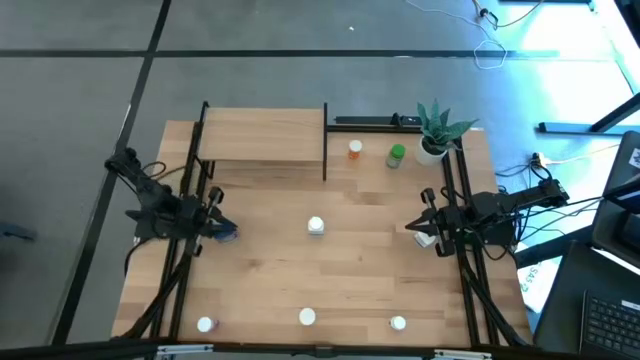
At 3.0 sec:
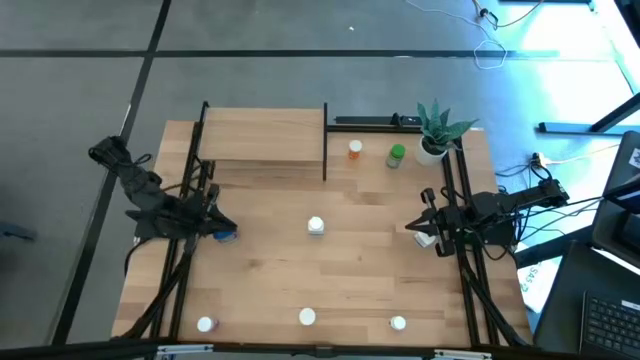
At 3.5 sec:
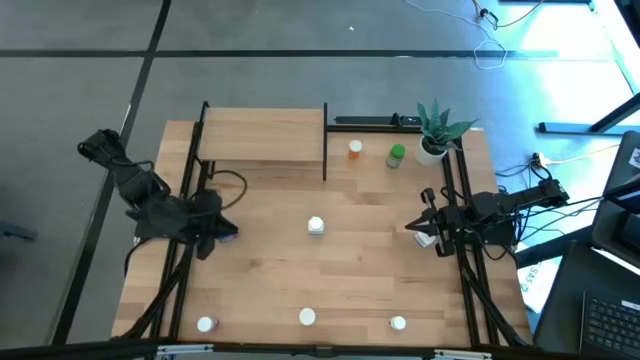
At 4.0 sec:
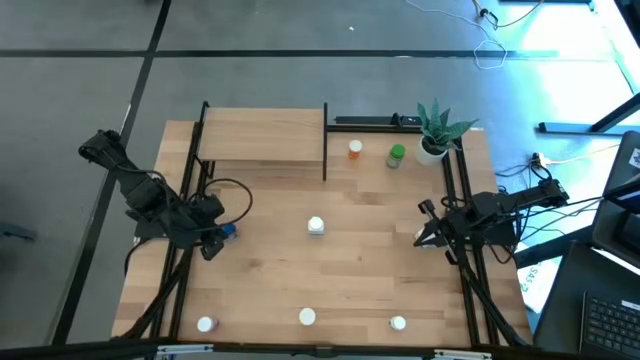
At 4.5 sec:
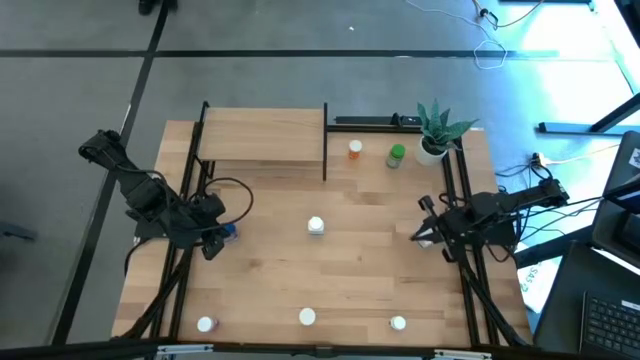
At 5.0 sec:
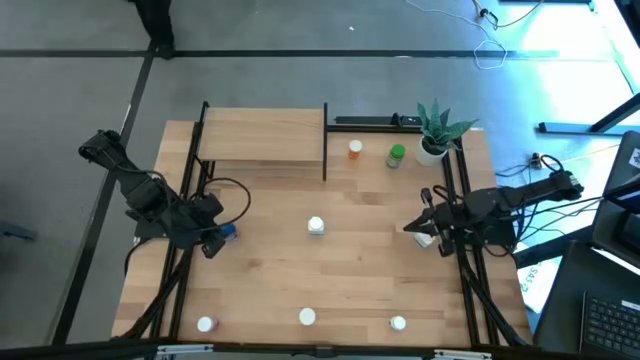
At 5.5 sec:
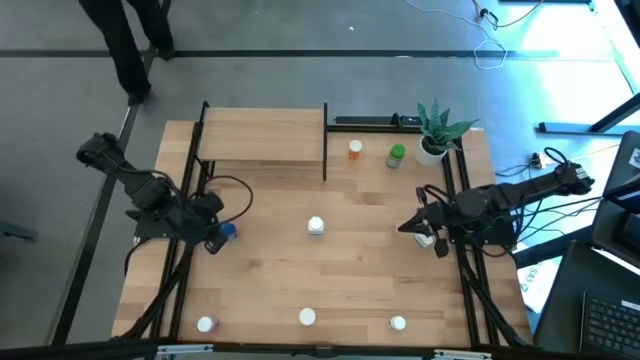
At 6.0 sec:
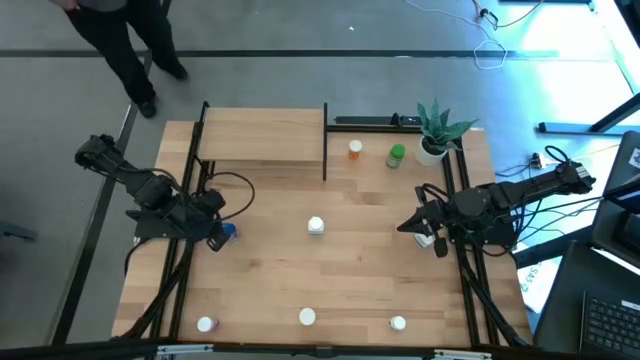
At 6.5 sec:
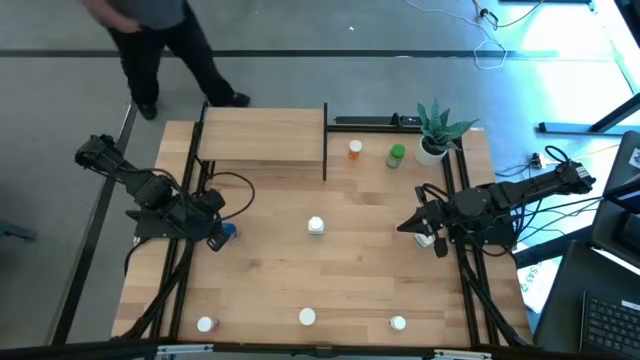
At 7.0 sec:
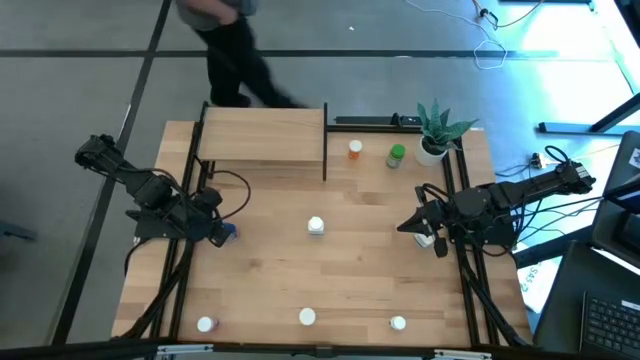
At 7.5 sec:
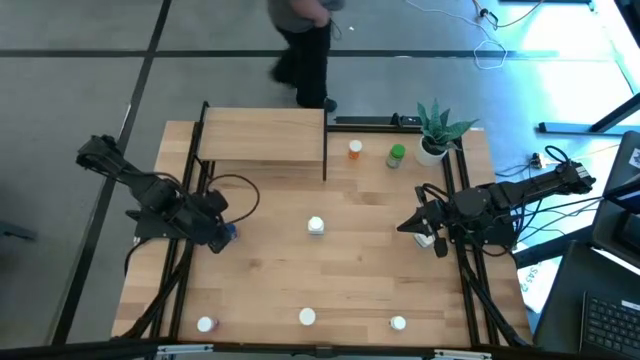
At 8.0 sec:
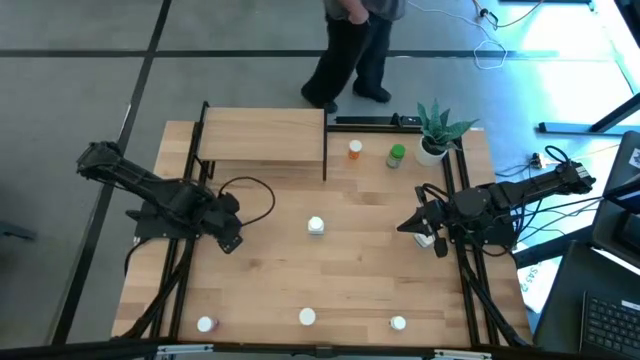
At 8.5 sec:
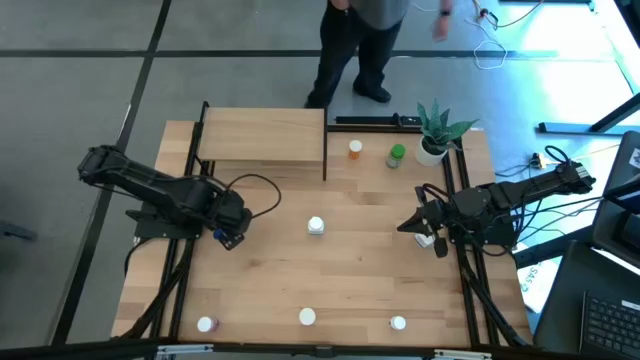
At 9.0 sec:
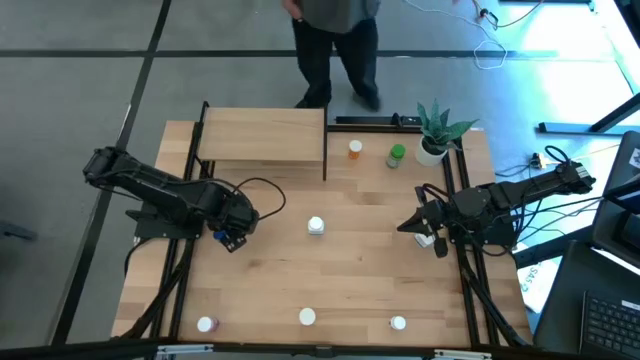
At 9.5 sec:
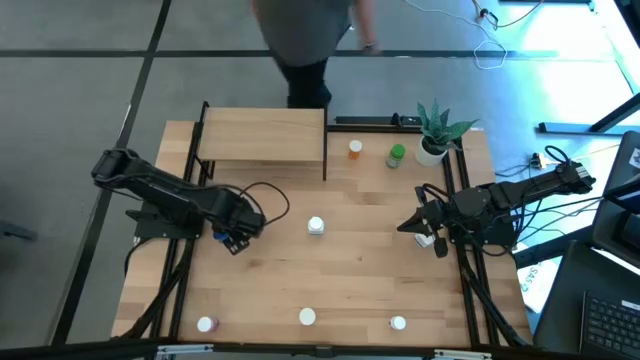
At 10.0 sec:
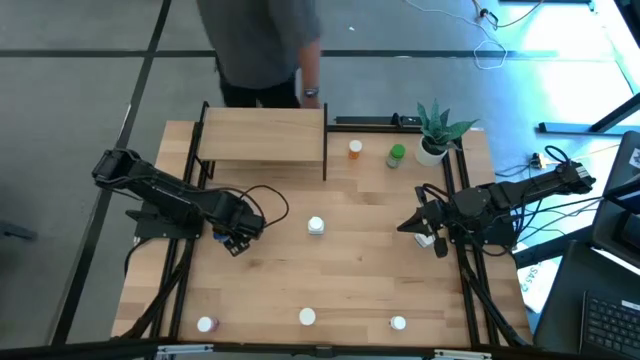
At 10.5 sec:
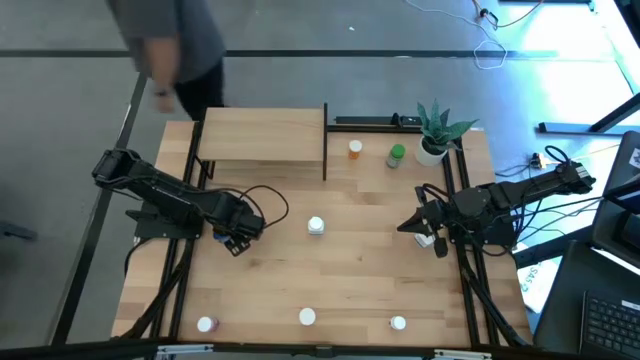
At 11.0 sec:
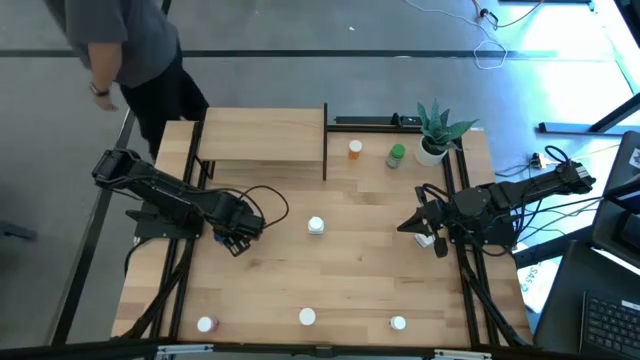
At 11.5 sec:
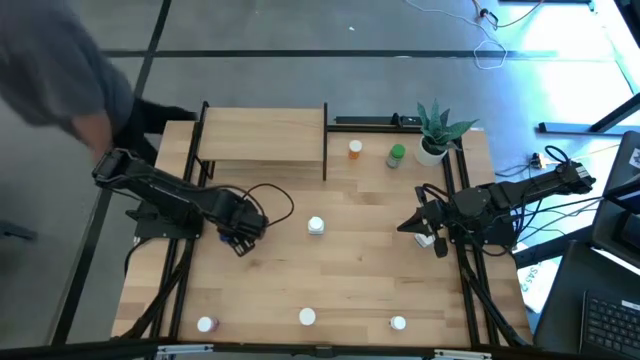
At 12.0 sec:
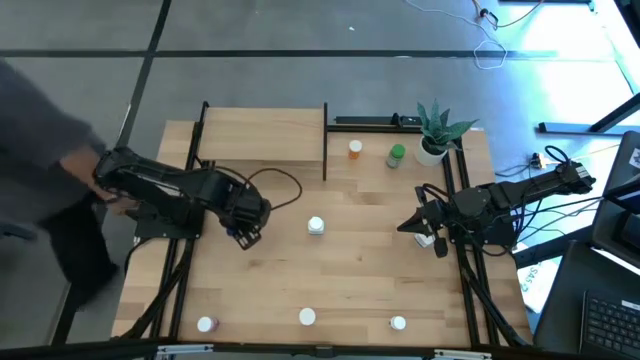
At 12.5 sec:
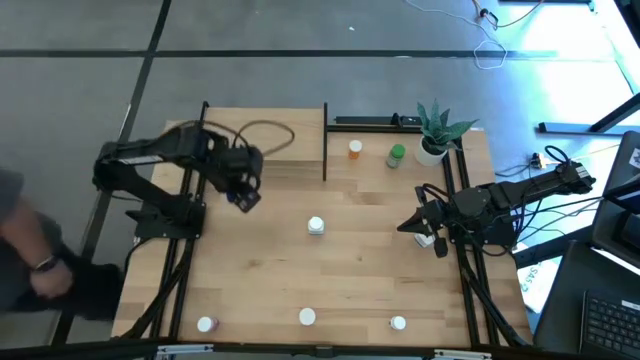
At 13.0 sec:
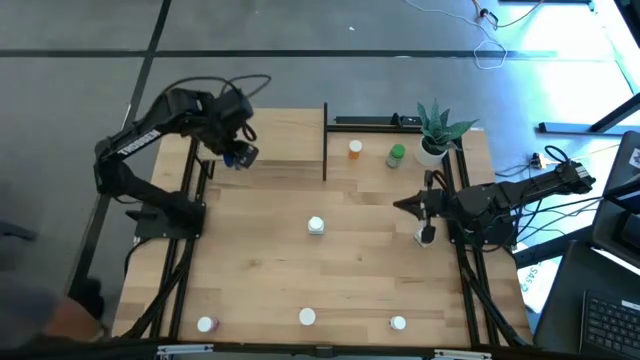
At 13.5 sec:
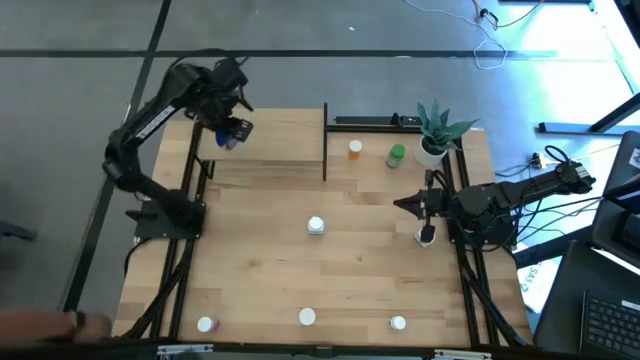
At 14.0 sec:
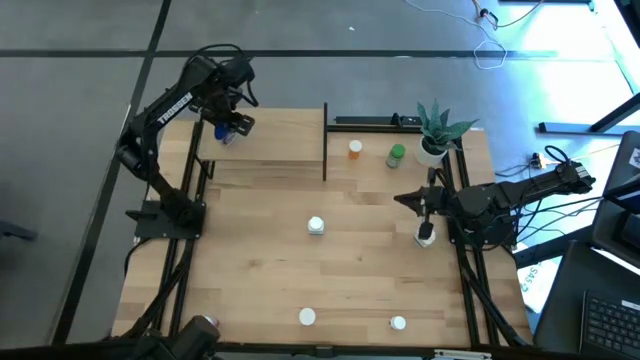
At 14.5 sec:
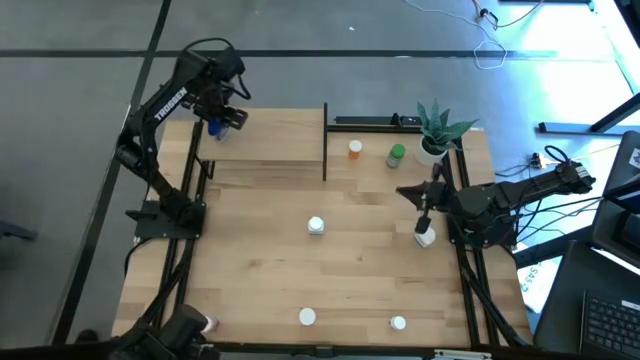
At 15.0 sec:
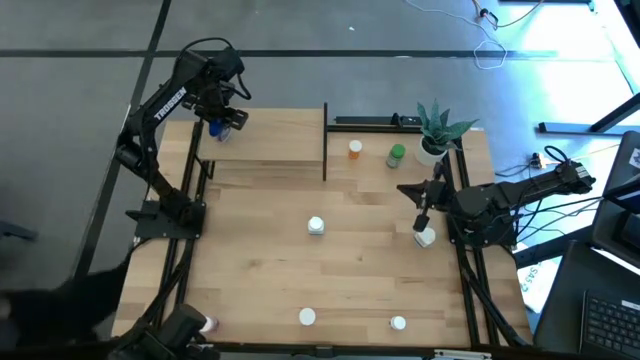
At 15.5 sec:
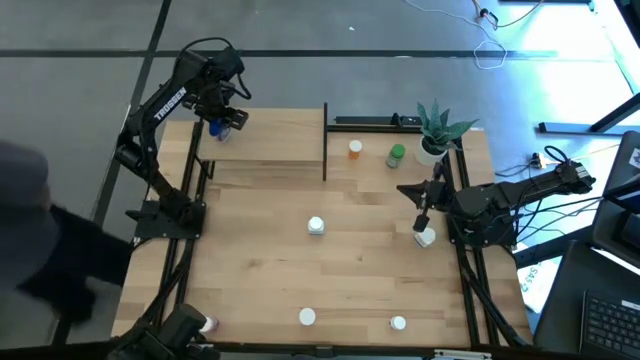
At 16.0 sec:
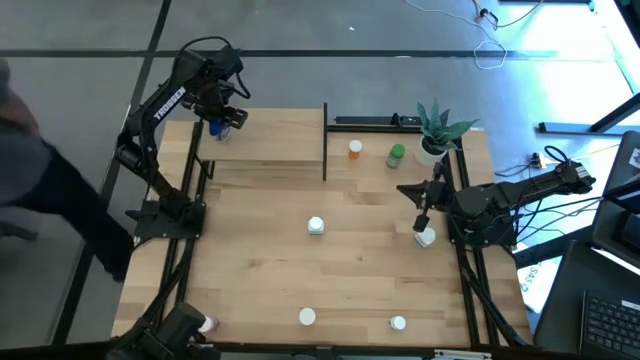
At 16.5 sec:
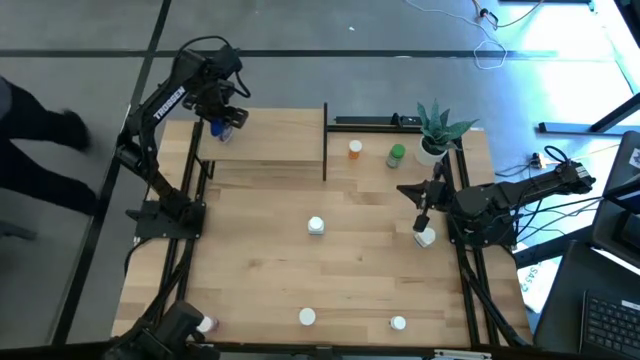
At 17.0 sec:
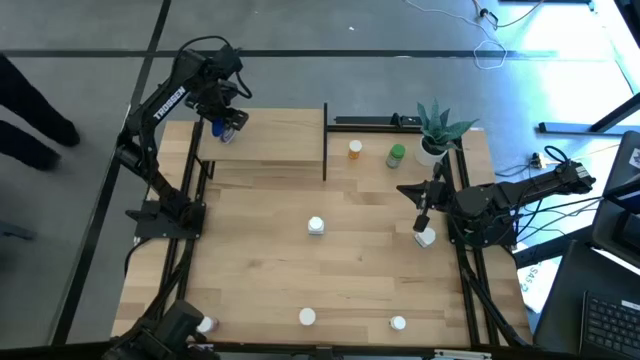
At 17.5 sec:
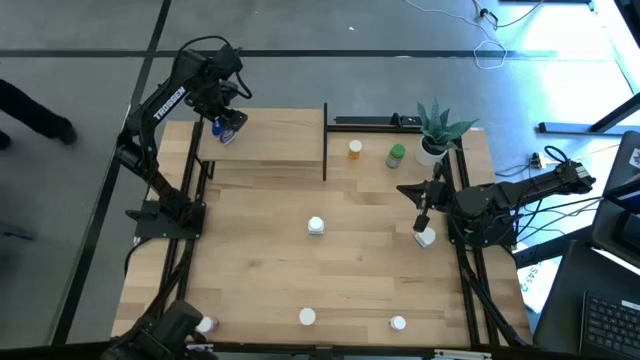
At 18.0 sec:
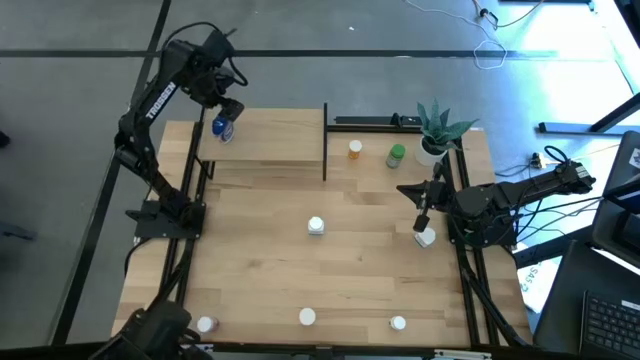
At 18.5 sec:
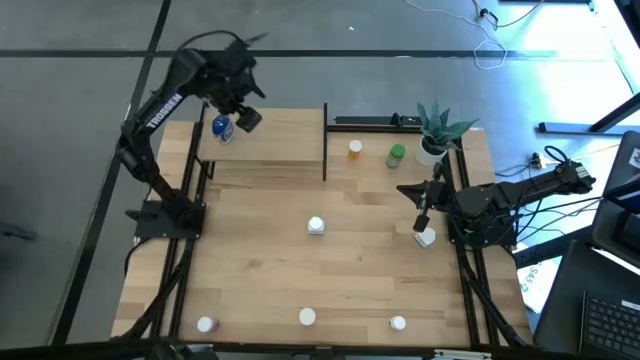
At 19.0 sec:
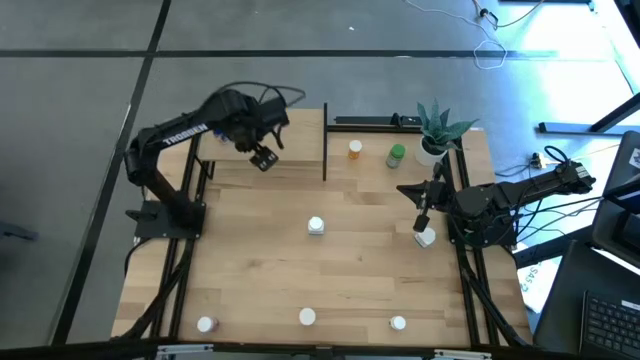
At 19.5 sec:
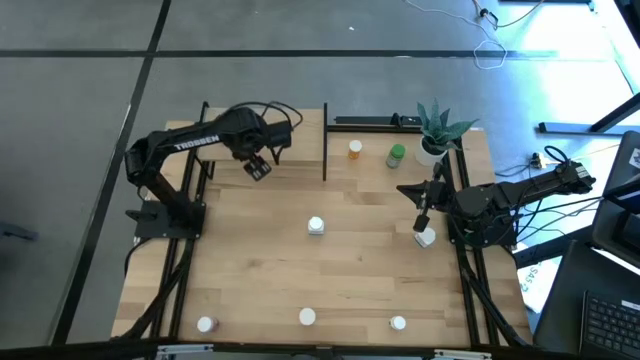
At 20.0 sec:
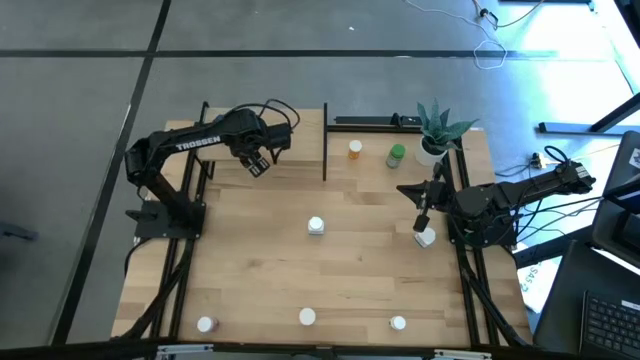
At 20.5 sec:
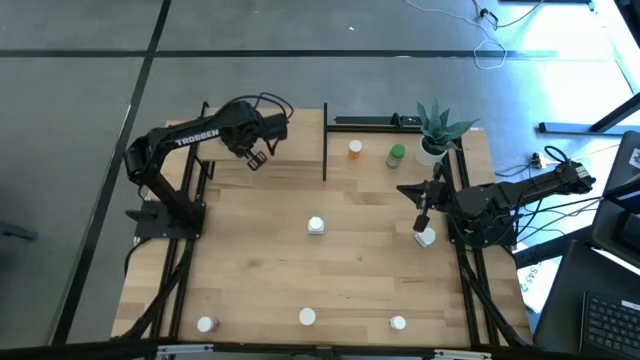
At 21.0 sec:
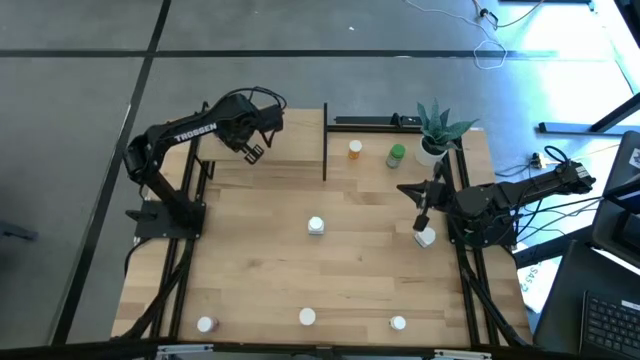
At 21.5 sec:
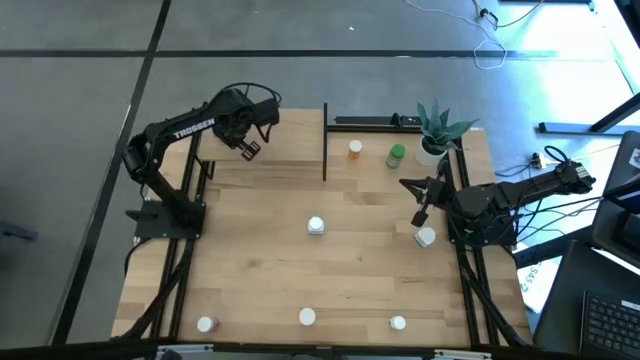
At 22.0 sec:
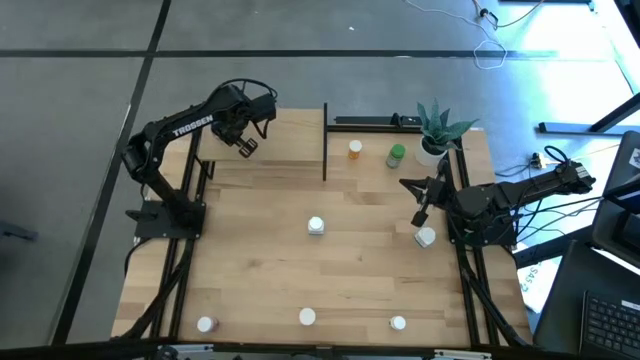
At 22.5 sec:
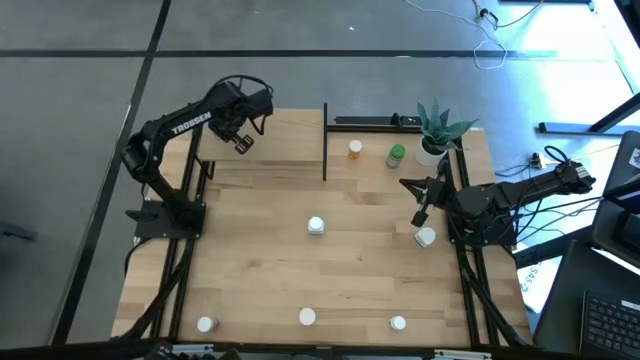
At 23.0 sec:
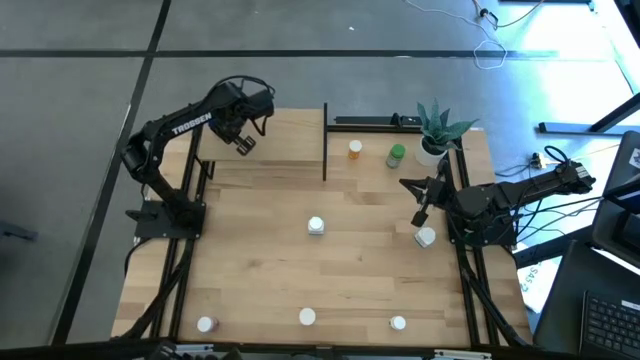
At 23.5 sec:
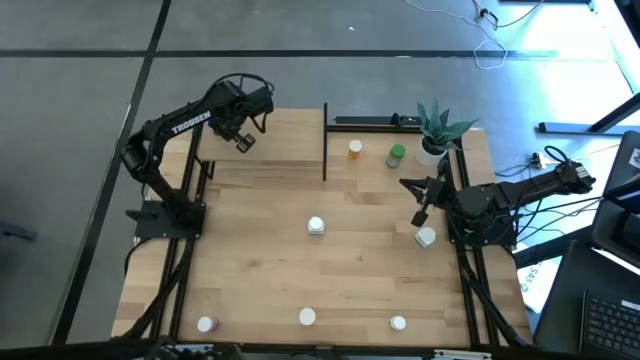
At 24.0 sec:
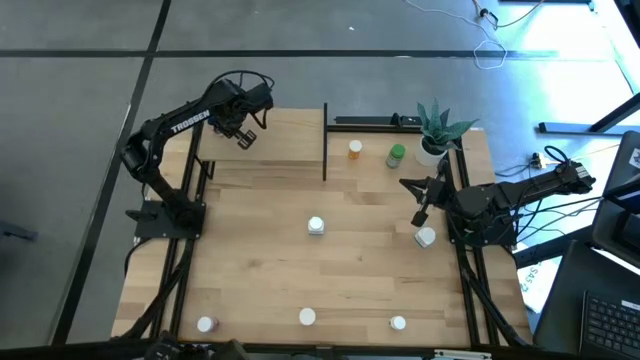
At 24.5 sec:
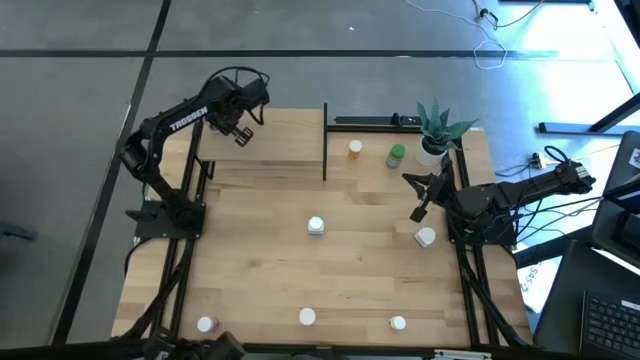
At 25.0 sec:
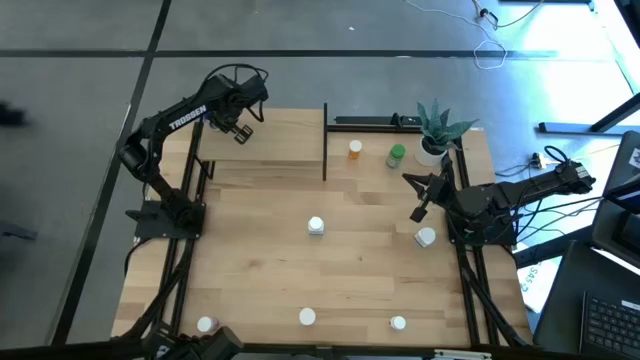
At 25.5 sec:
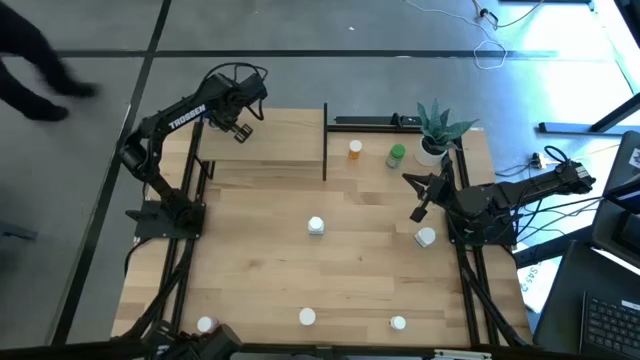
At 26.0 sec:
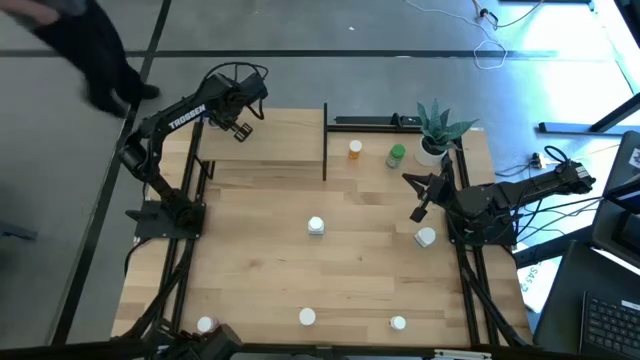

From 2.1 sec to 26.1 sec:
Task: Pick and place medicine bottles onto shelf by color
Put the blue pill bottle on the shelf
